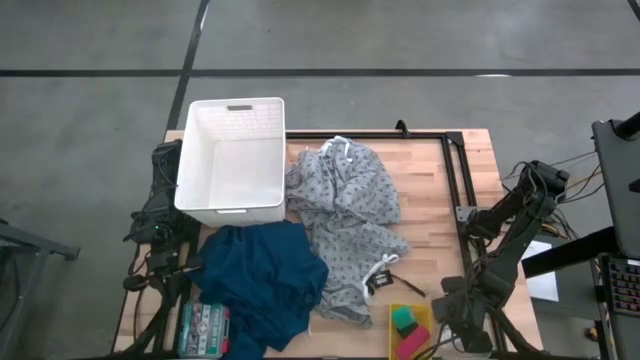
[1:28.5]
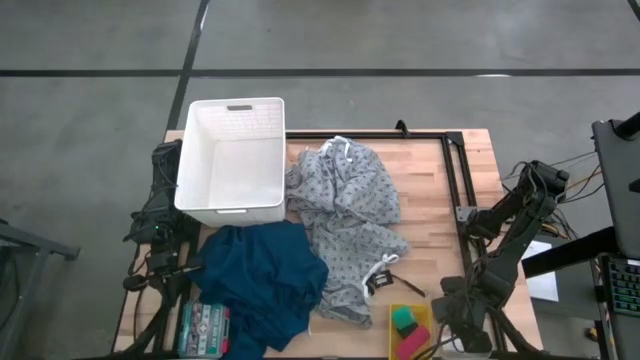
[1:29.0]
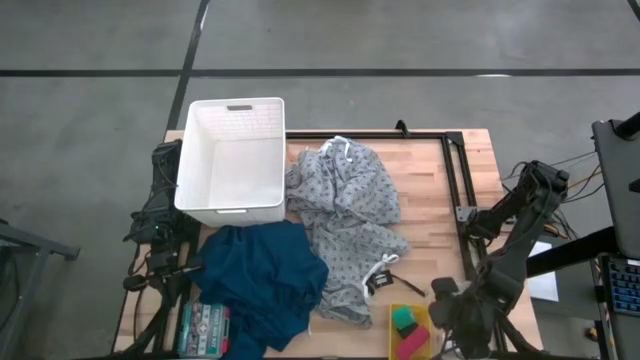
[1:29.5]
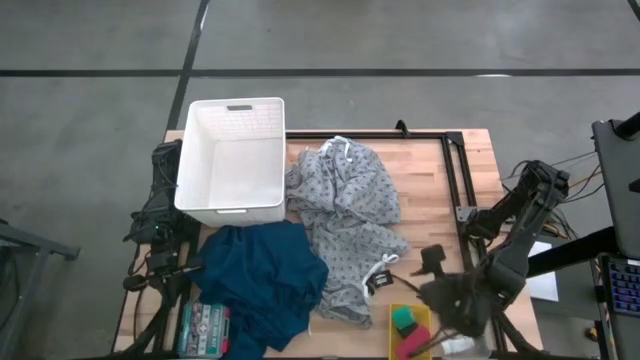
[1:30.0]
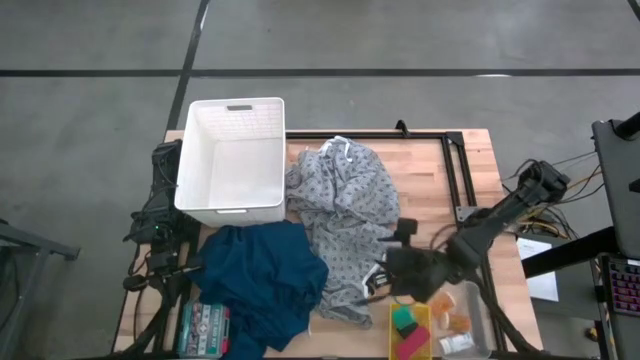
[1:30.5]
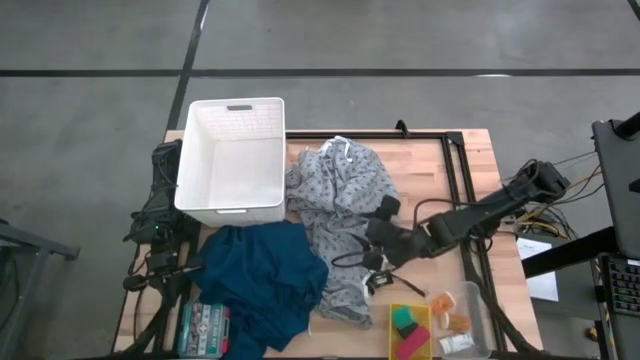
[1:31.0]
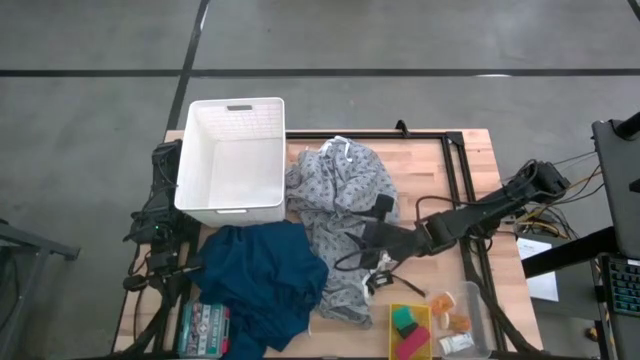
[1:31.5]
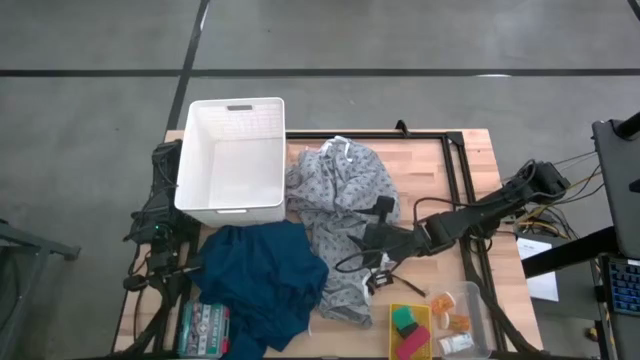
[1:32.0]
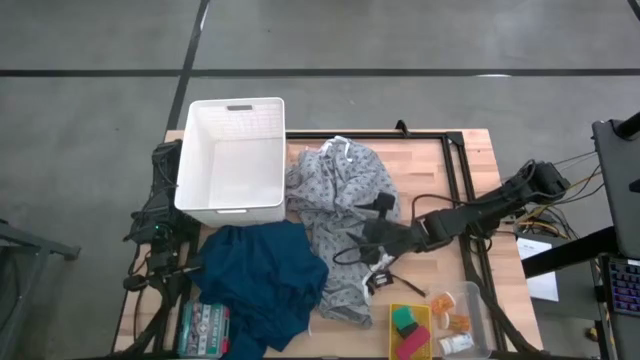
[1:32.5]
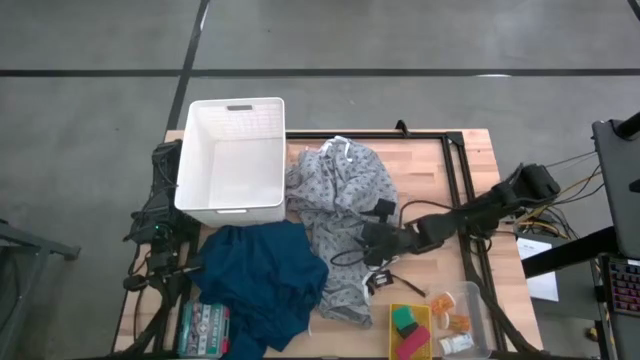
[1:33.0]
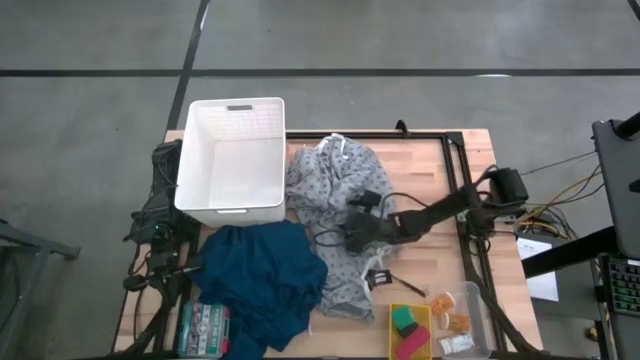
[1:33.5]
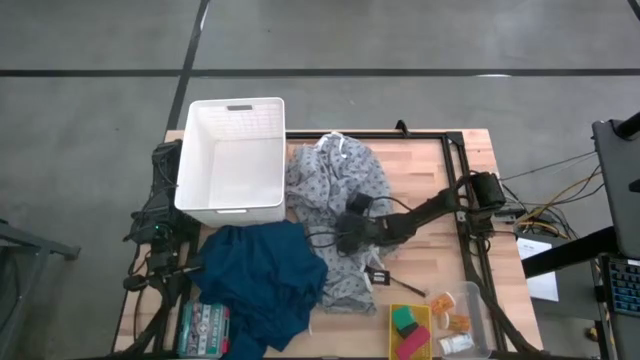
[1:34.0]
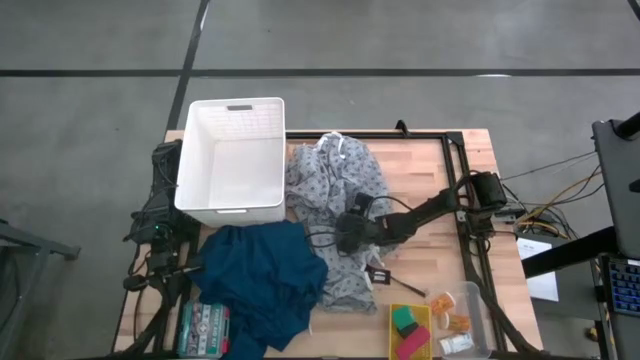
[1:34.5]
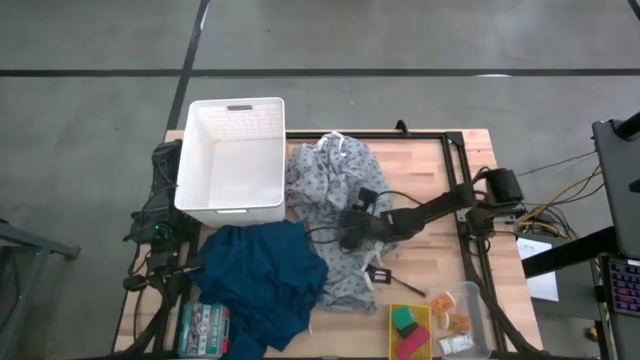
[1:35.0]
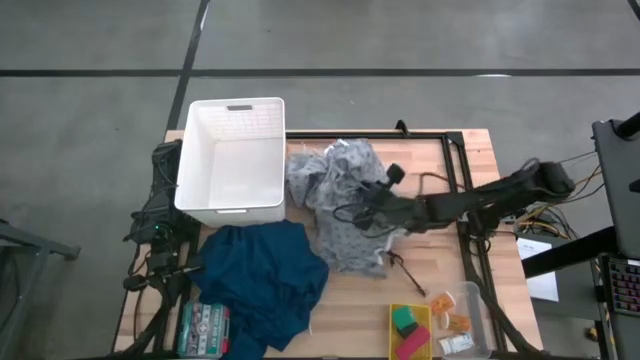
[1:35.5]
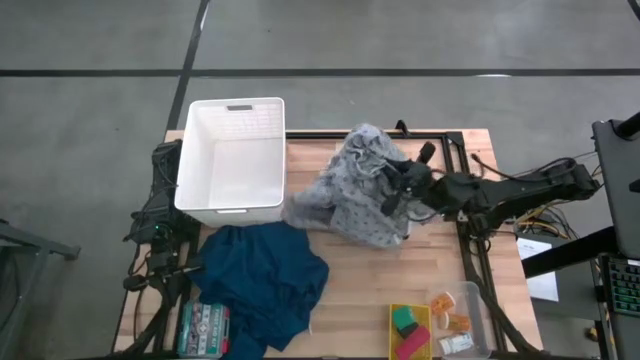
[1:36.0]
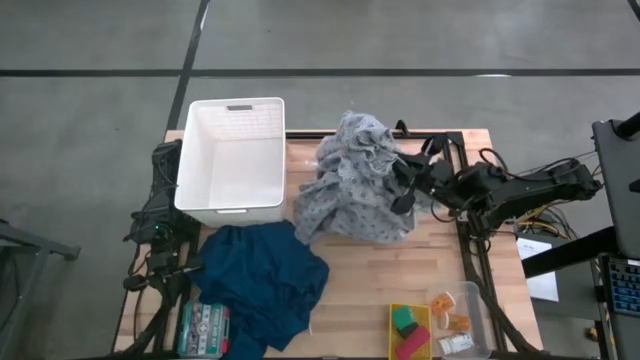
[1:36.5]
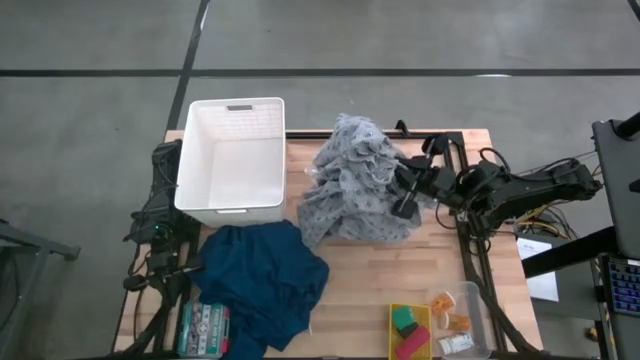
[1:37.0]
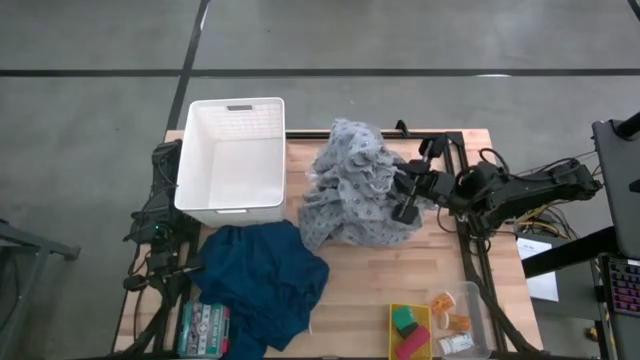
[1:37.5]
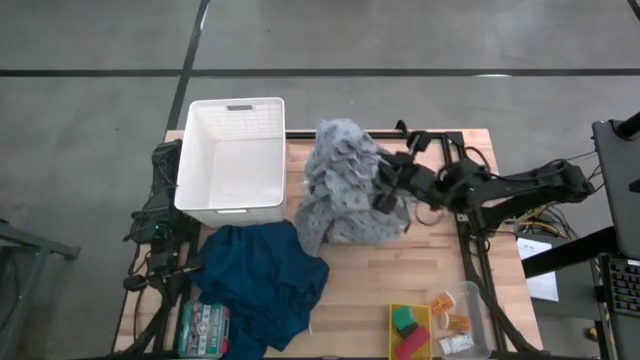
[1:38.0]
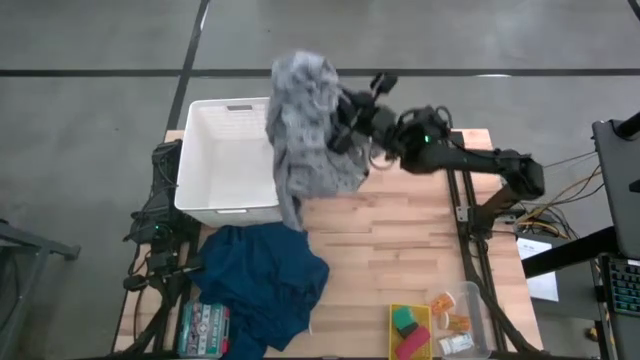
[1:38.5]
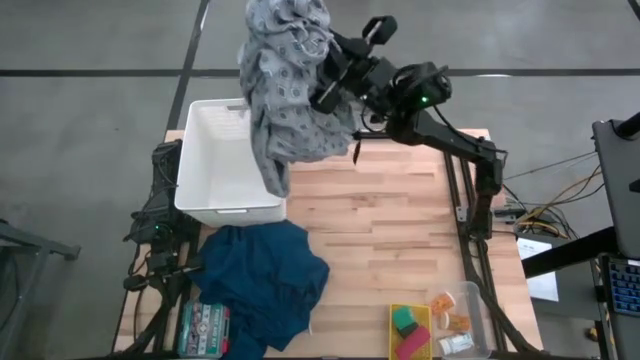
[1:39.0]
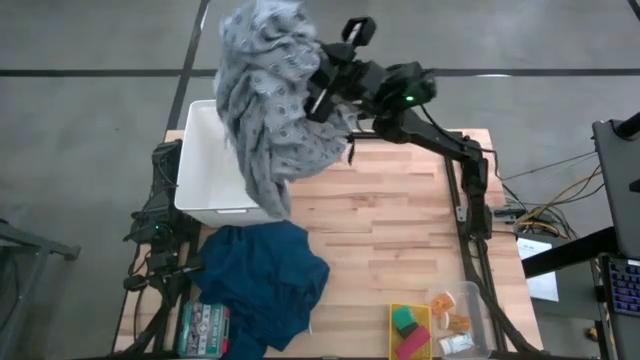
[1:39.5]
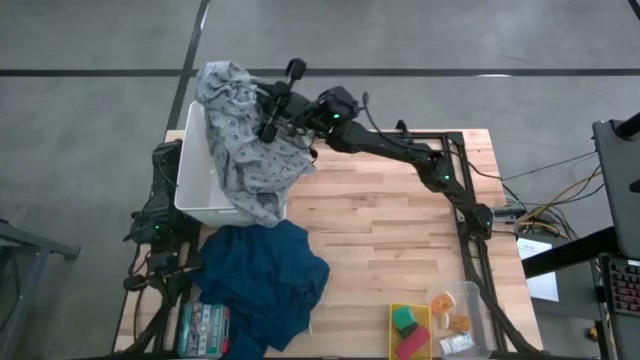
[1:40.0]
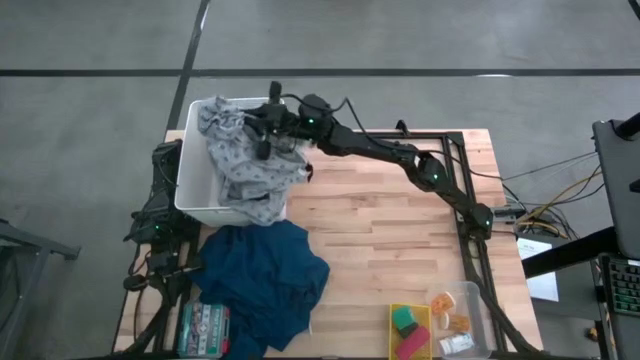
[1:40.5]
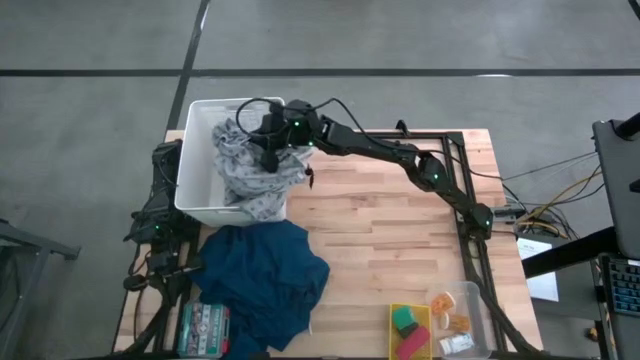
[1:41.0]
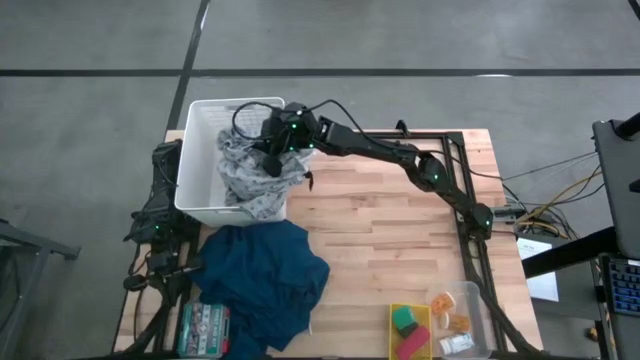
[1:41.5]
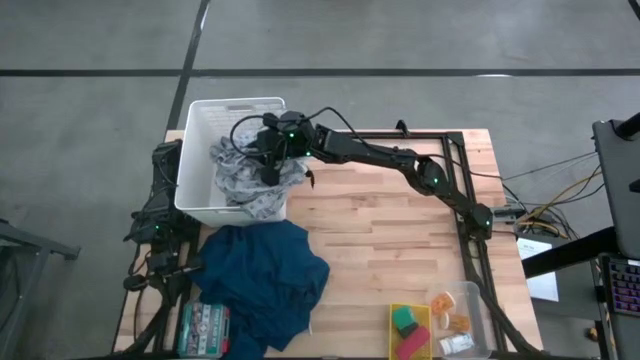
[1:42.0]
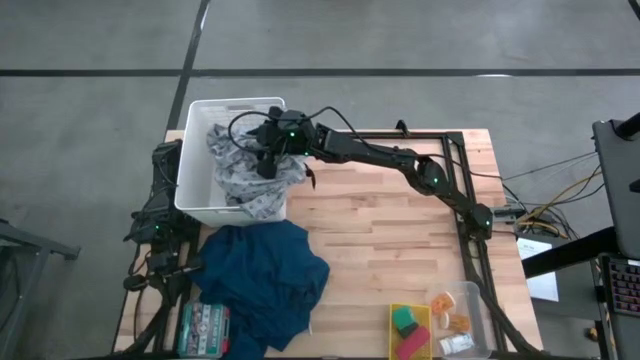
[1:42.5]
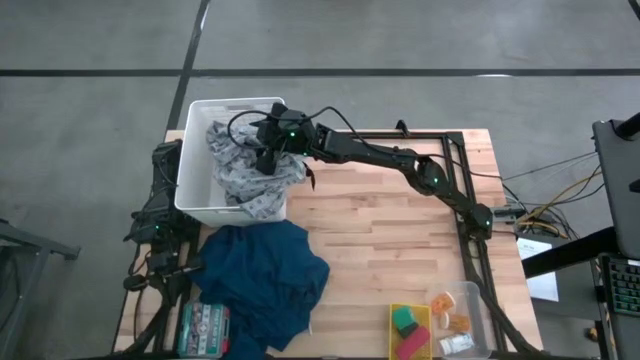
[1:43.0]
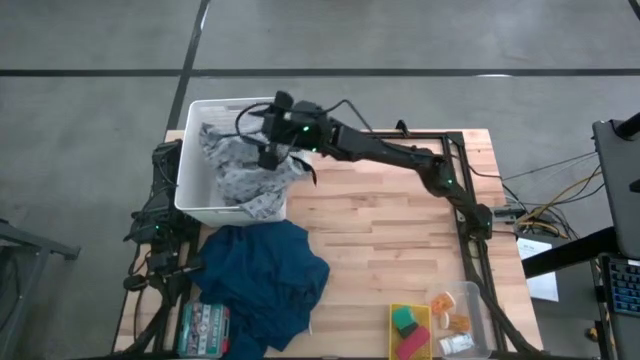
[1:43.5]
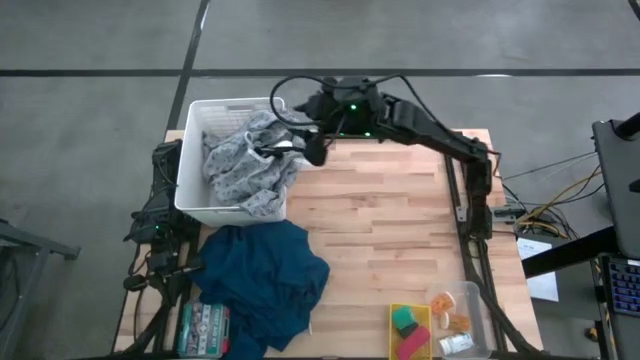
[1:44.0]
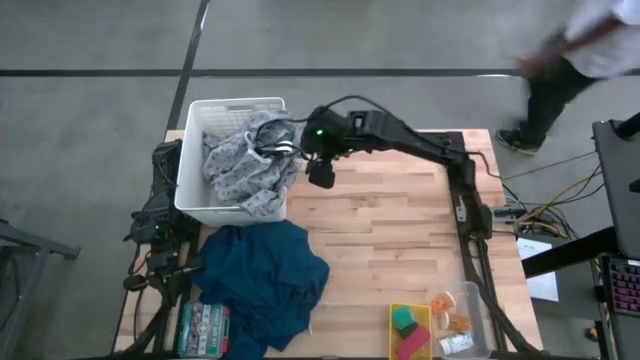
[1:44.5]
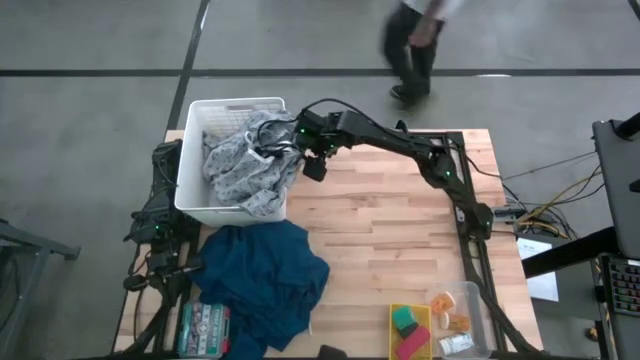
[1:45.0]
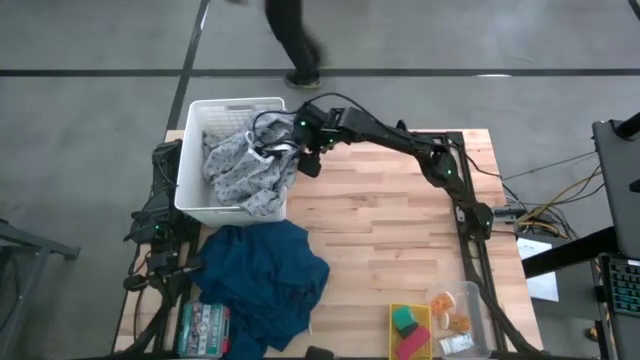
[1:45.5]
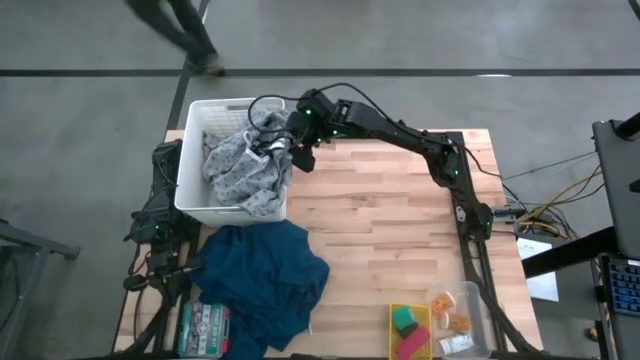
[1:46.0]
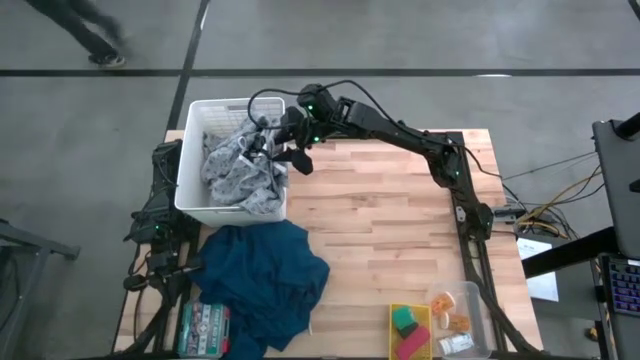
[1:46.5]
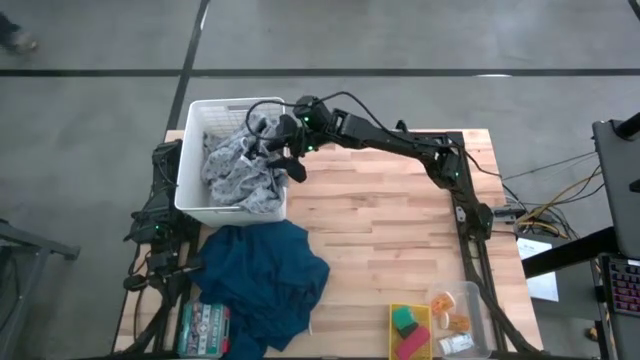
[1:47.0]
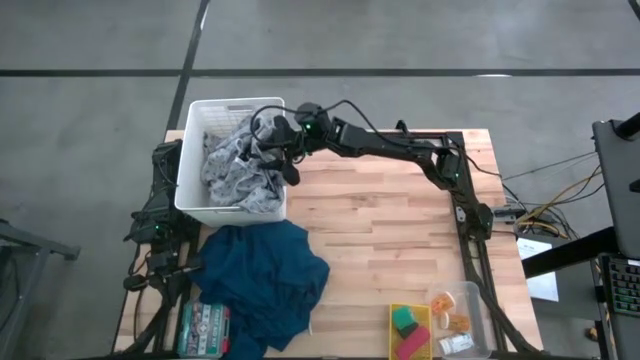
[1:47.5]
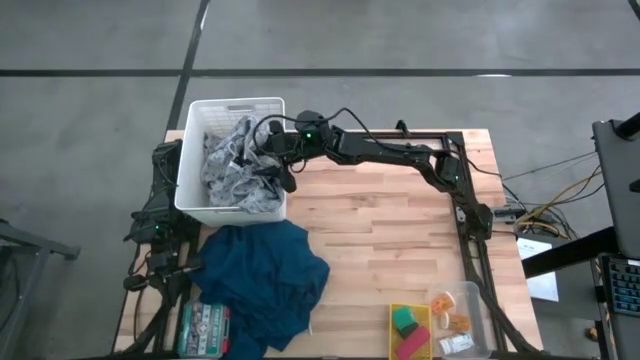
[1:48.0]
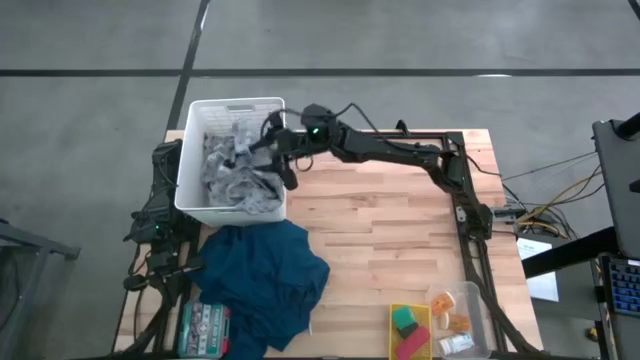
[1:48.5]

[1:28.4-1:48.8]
Task: Pick & Place Medicine items
Put the gray patient gown into the white laundry bin

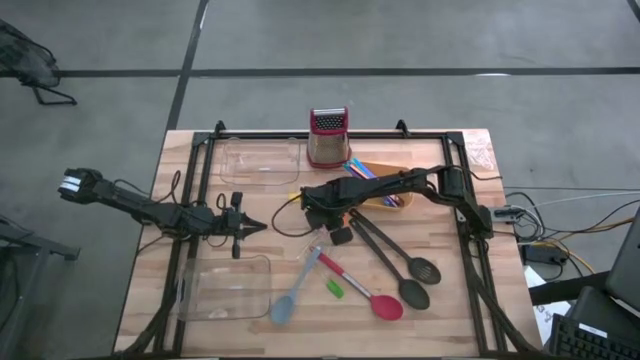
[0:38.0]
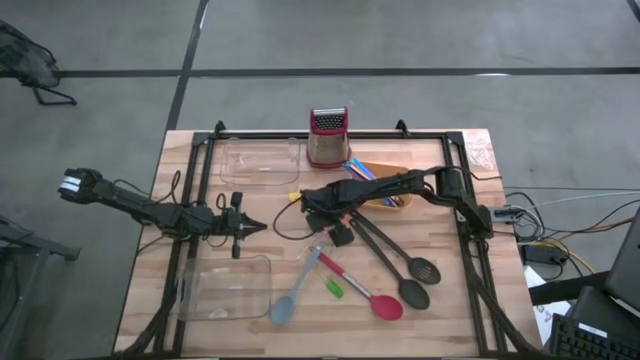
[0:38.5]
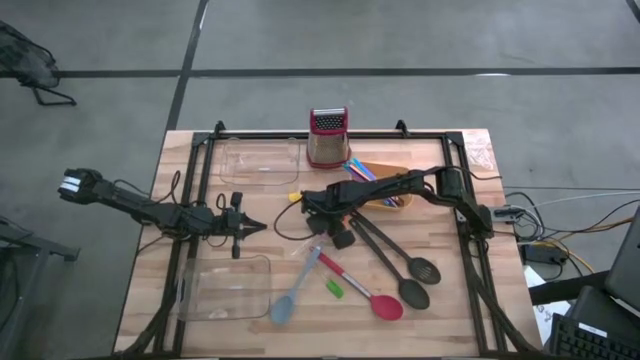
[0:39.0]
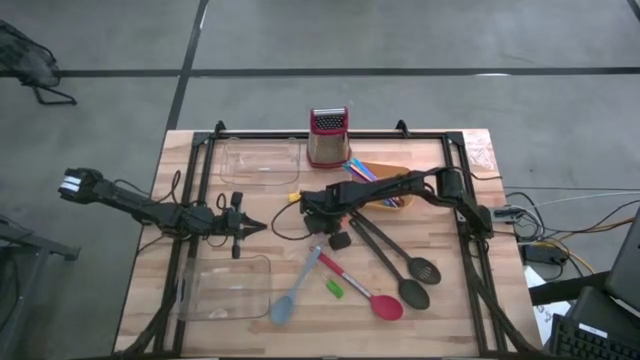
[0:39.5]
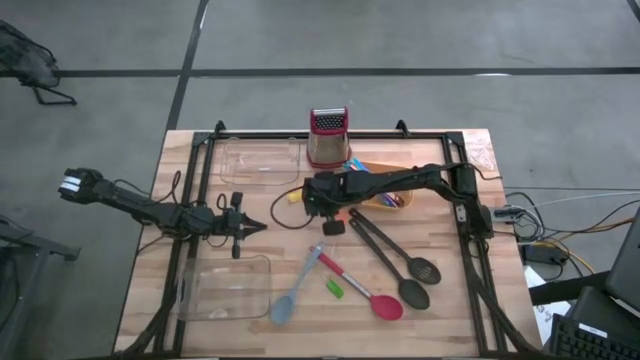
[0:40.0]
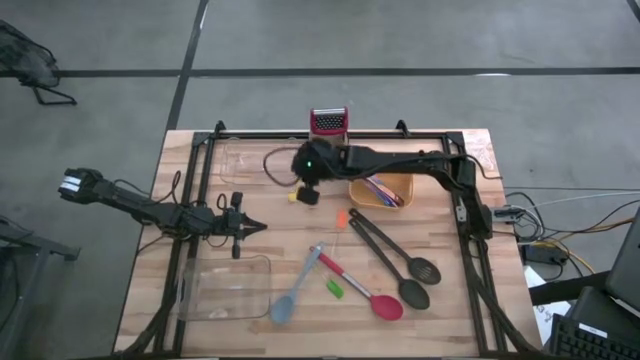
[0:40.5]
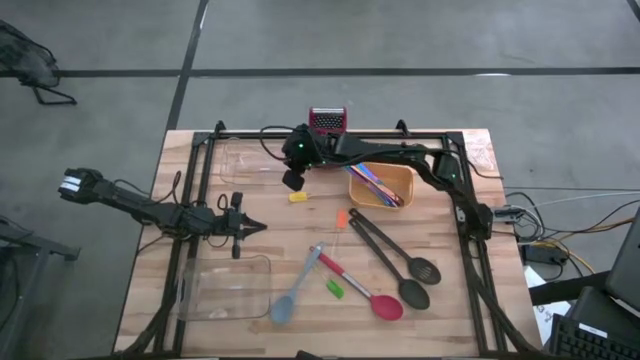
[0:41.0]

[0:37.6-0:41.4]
Task: Pick & Place Kitchen Items
Put the pink spatula into the top transparent bin
